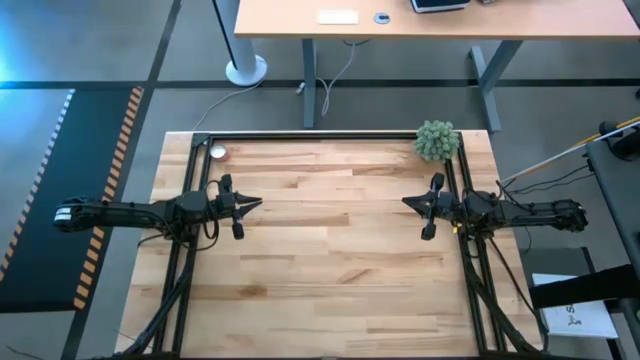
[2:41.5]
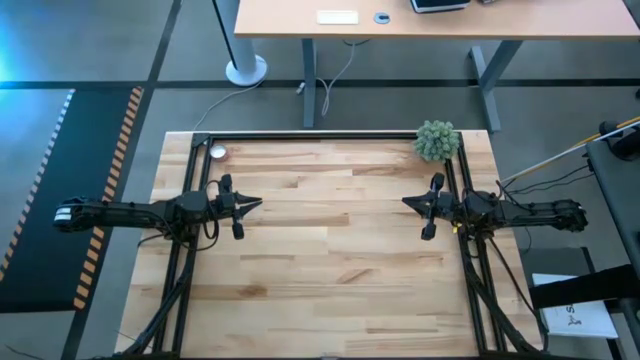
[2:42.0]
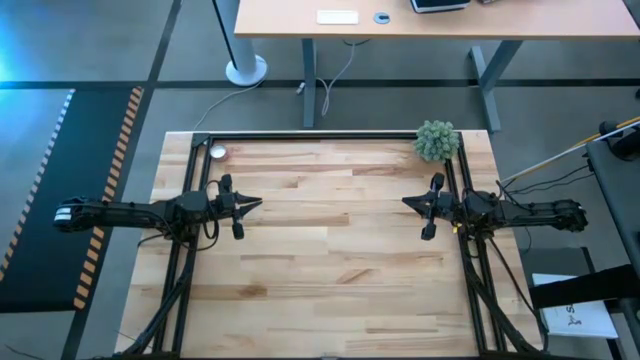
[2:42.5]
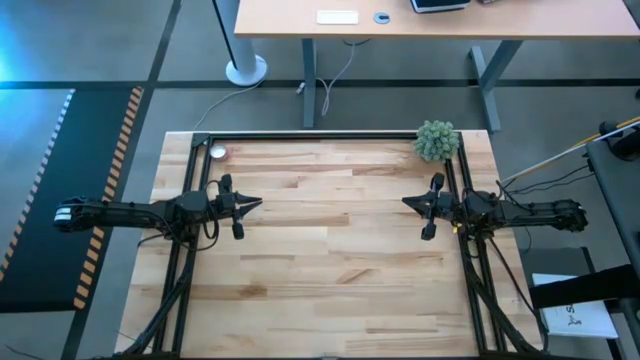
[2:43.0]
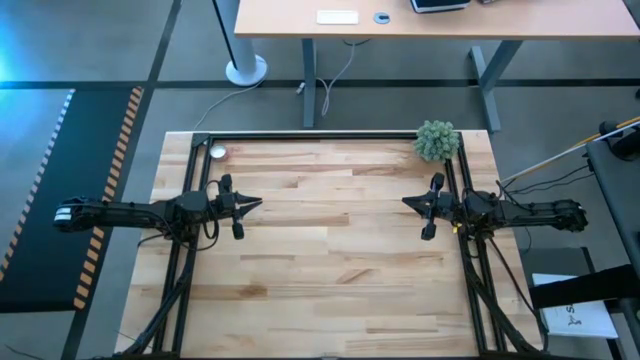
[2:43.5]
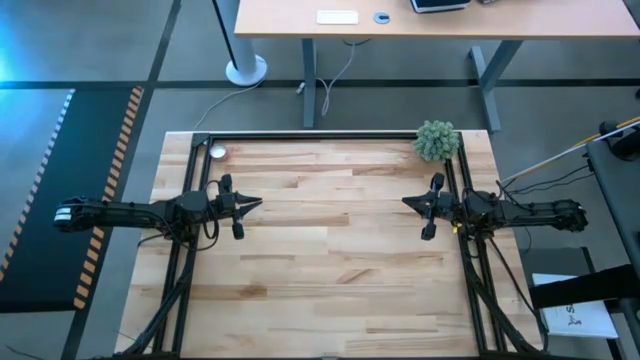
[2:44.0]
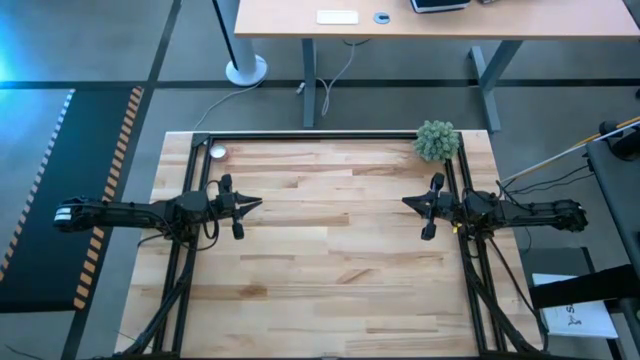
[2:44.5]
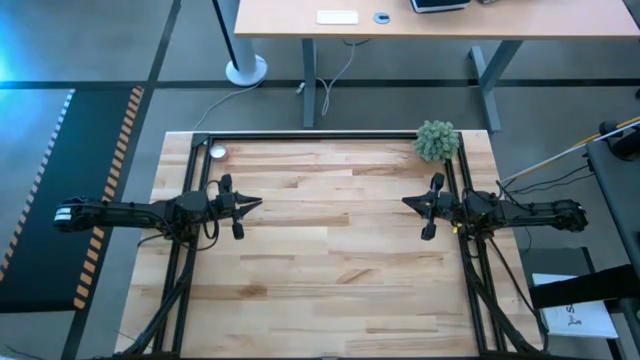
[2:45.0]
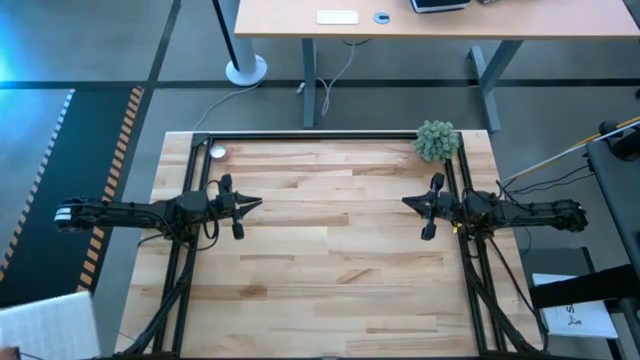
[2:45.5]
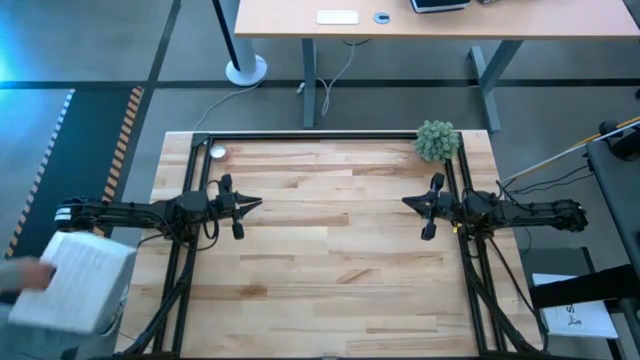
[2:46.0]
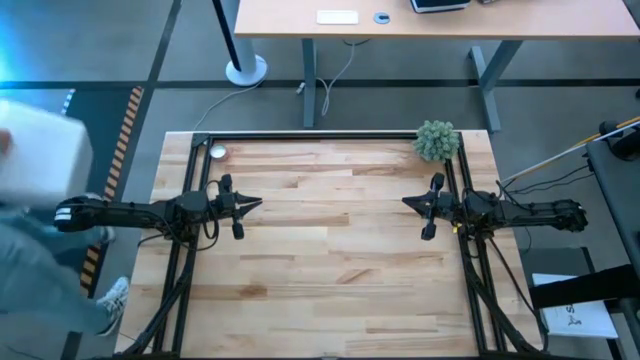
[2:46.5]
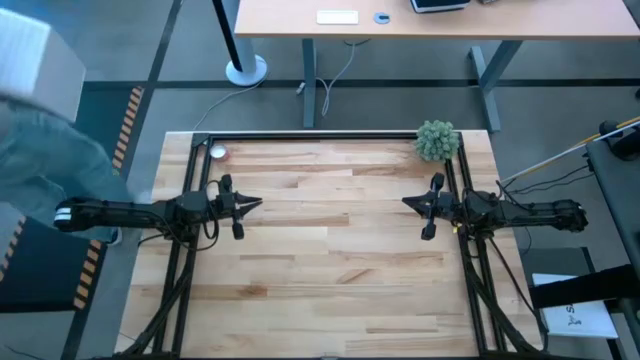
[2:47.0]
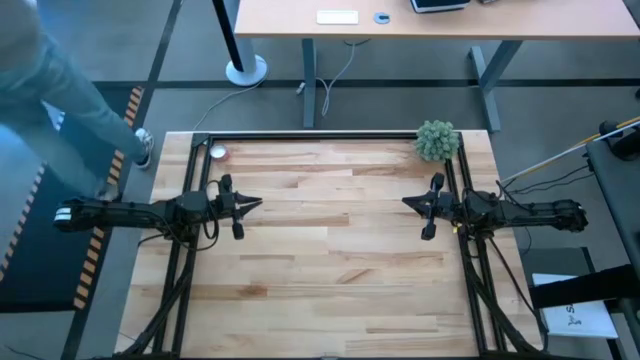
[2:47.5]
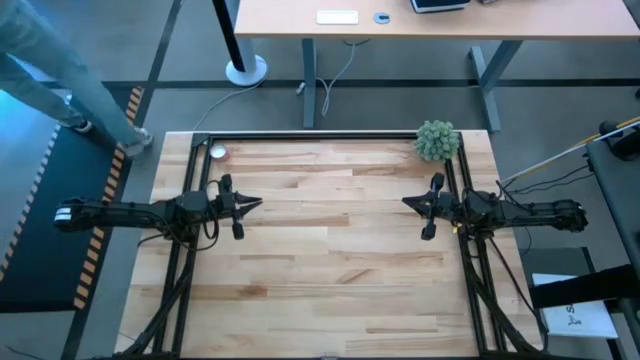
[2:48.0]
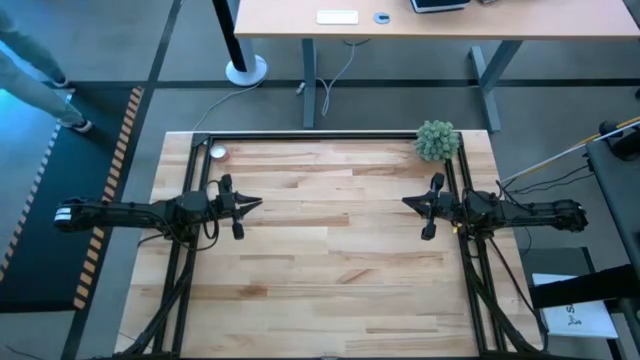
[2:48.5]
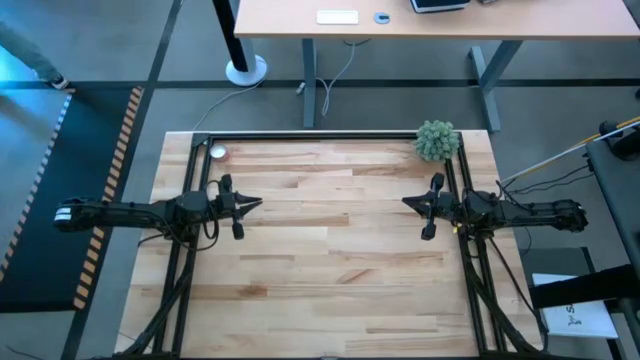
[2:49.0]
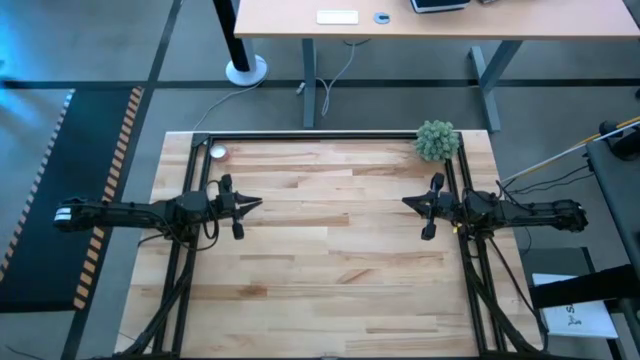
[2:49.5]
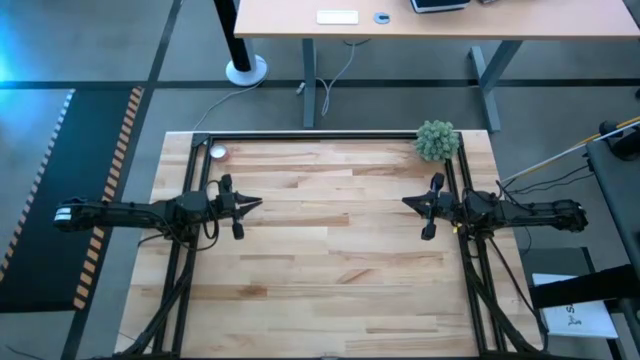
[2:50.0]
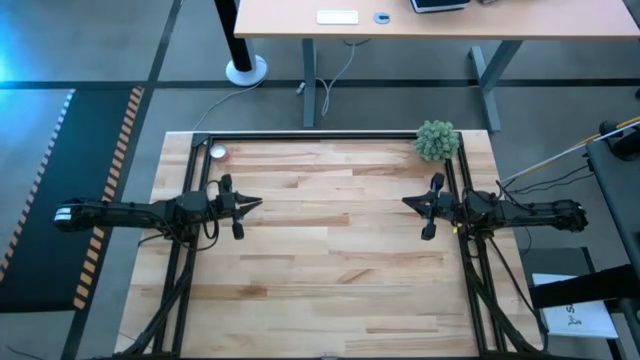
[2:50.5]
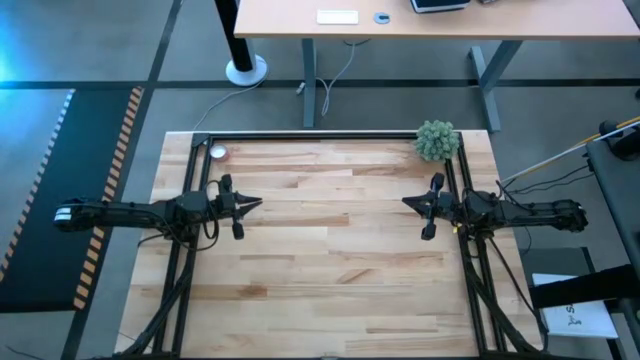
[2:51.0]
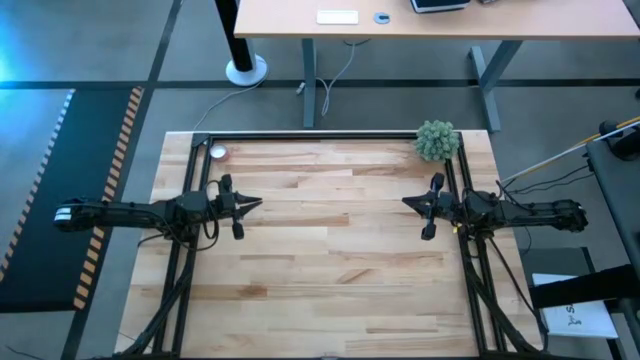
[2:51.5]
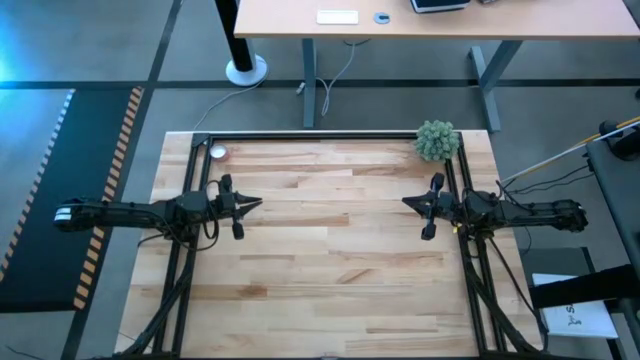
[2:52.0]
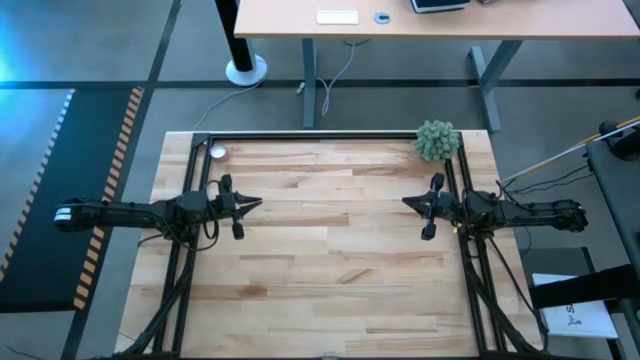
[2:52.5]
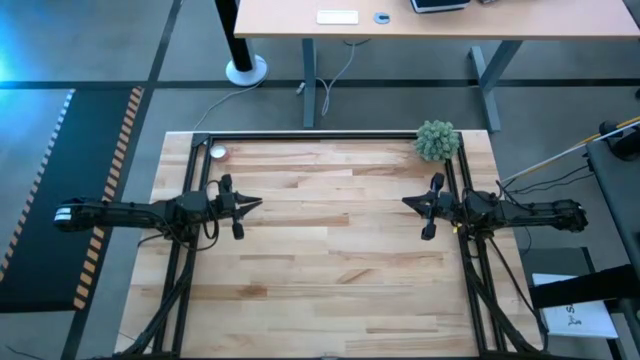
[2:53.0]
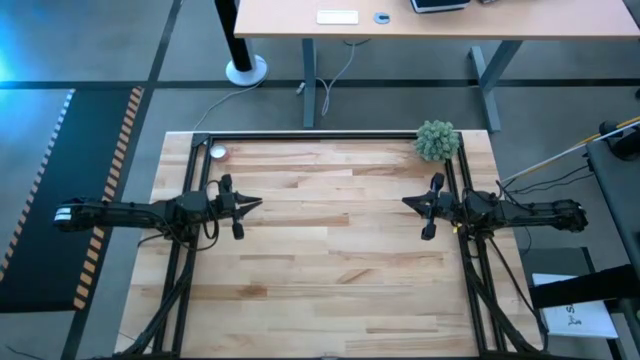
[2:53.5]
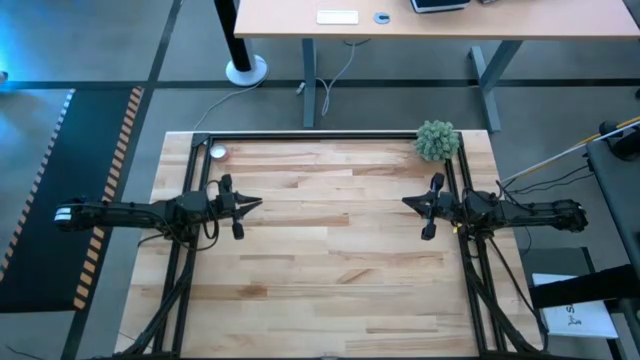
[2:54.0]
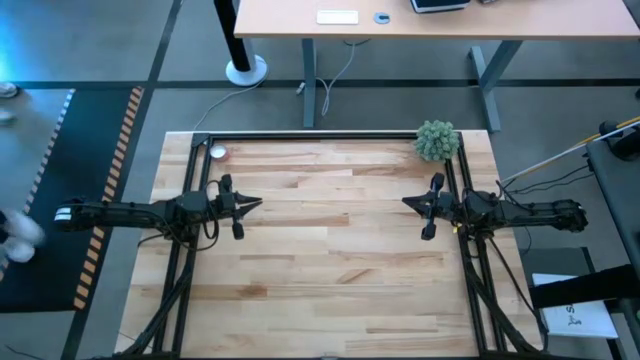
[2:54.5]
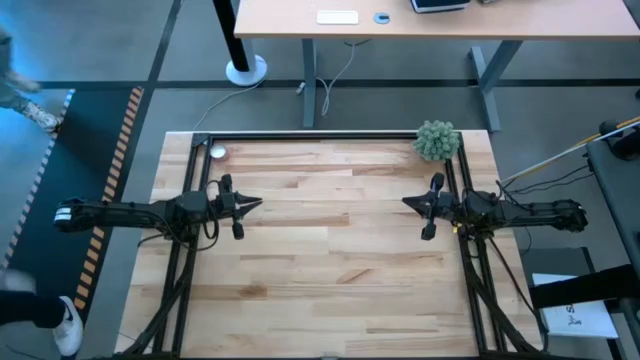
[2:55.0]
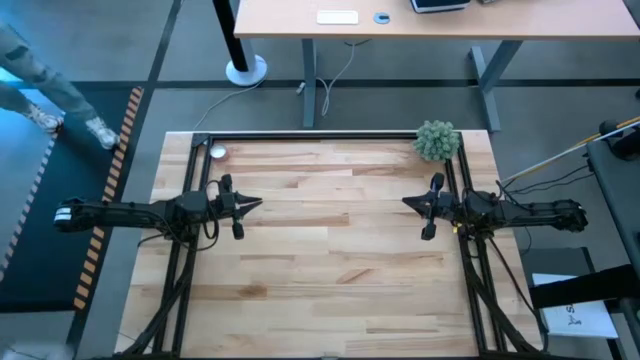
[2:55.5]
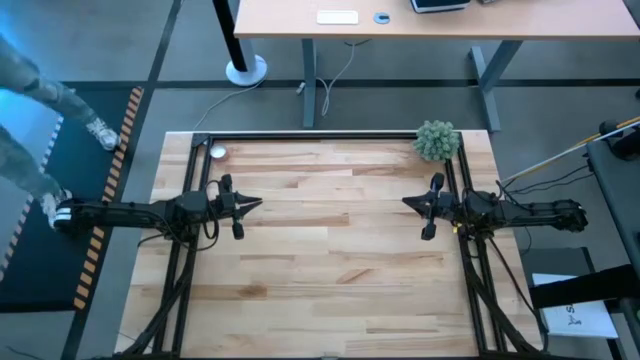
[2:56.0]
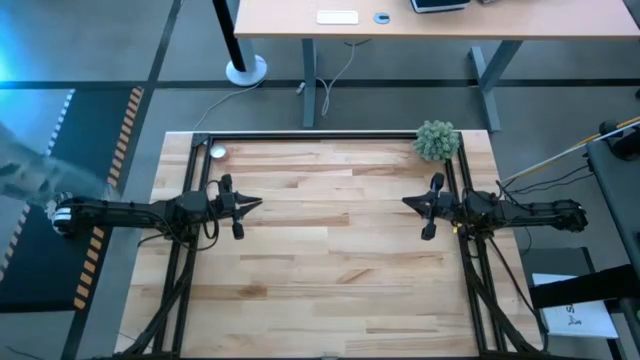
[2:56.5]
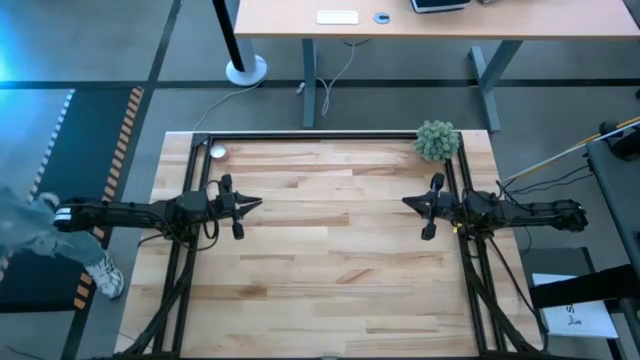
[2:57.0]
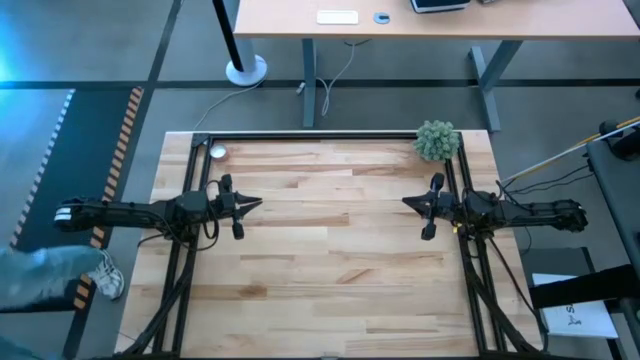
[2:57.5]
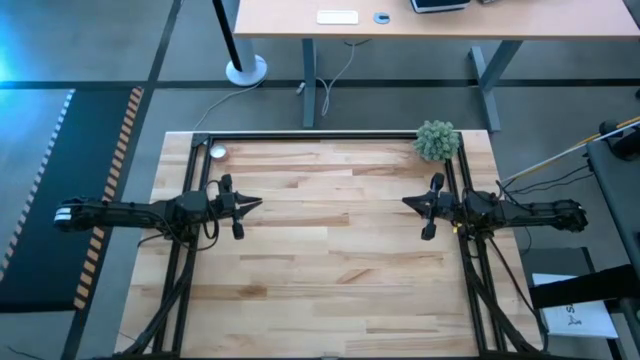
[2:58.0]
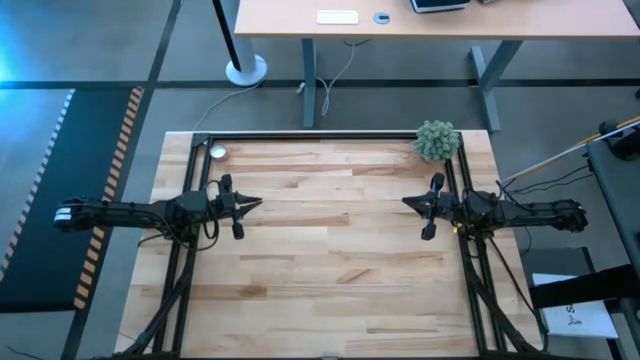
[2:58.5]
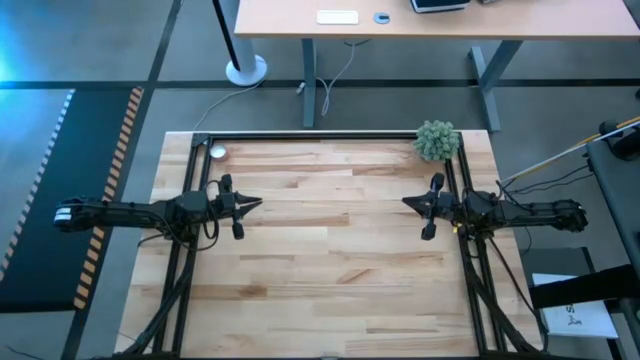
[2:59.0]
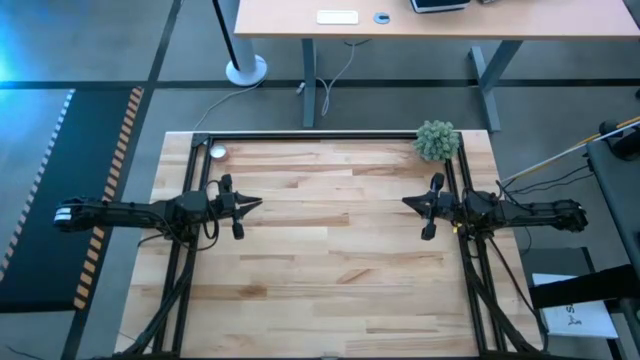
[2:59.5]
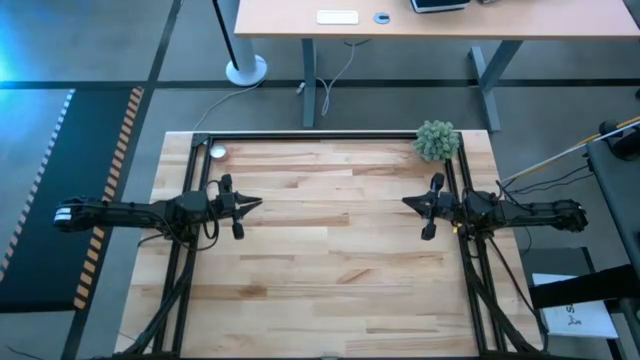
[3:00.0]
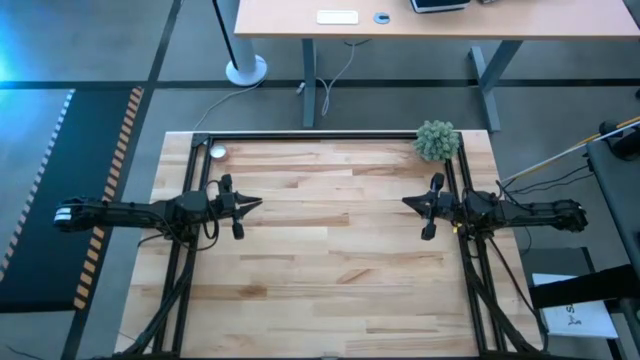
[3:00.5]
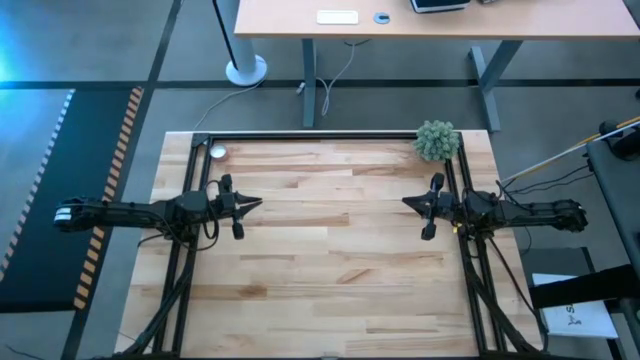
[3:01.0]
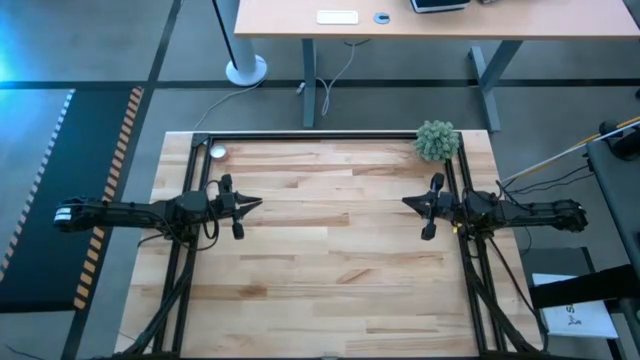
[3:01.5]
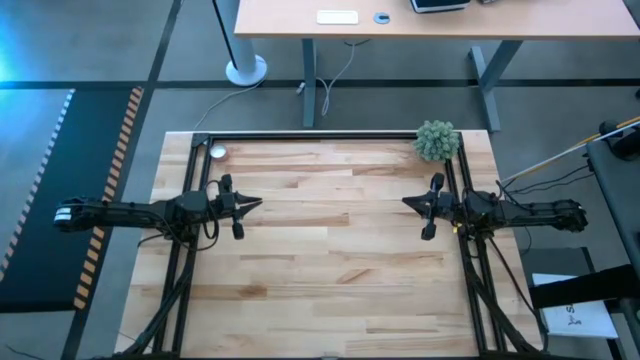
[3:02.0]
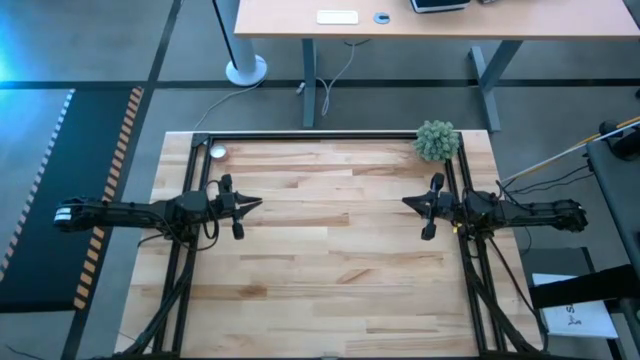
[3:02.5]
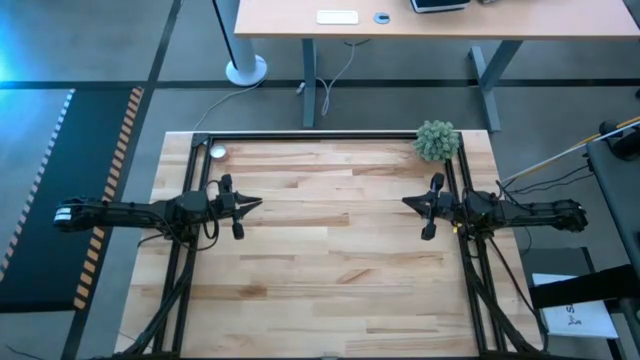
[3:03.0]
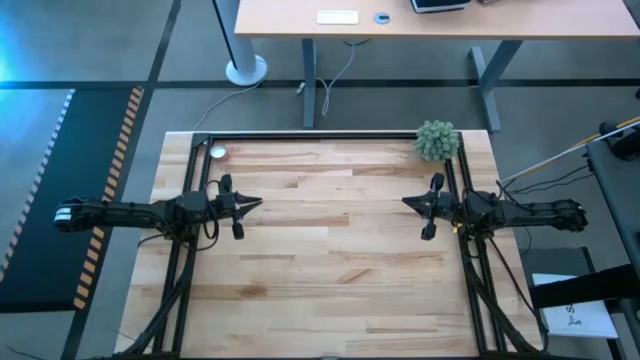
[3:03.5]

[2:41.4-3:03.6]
Task: Sort clothes
Return to Home Position
